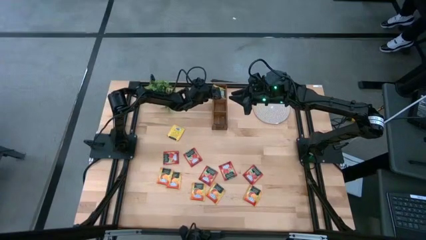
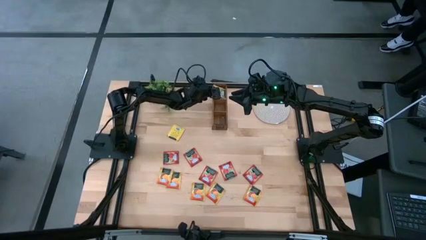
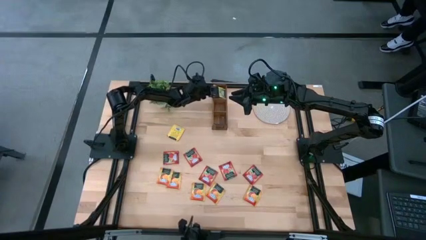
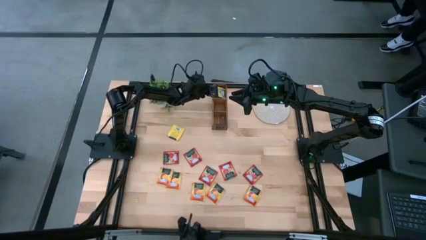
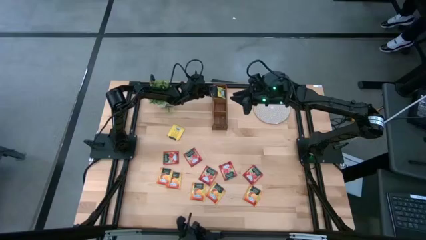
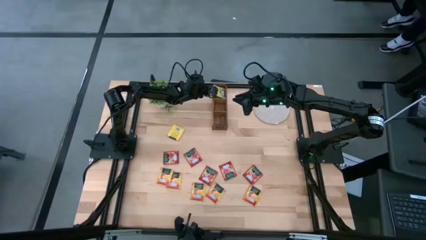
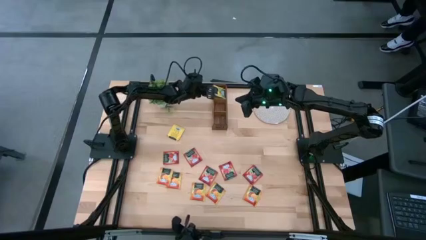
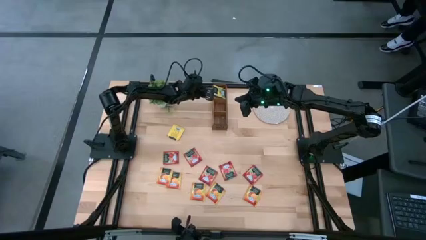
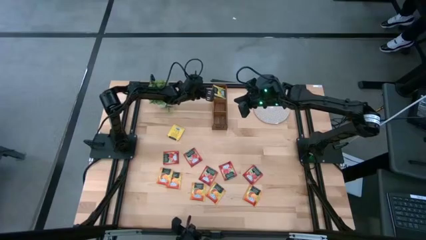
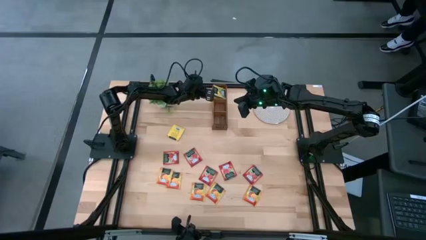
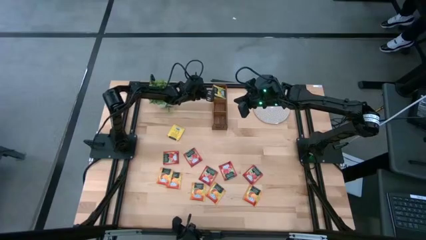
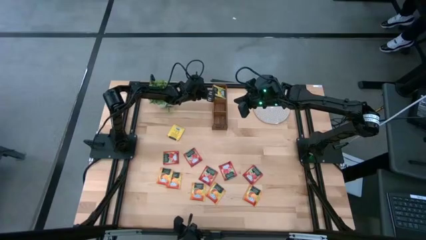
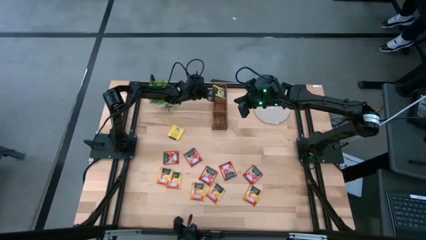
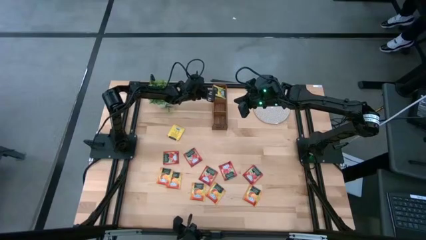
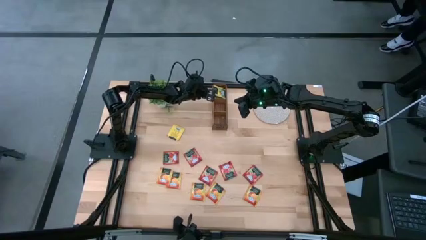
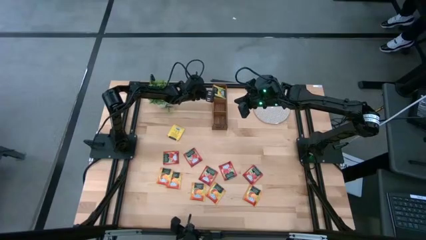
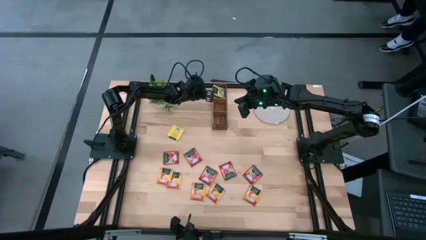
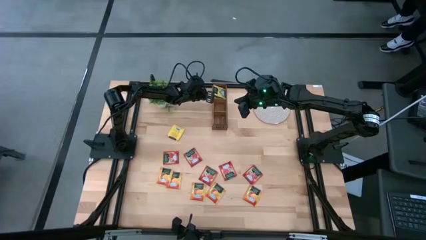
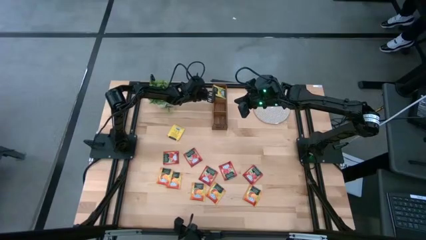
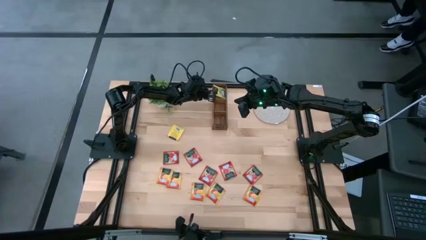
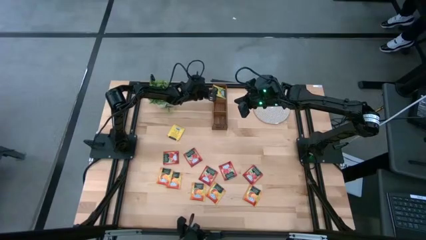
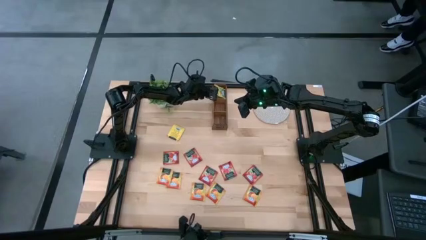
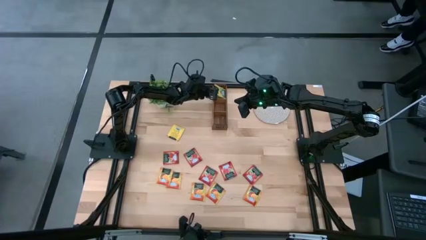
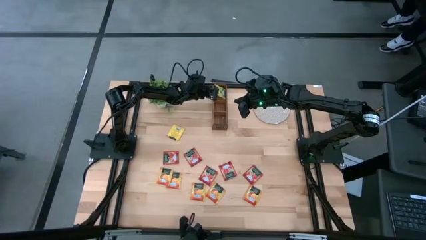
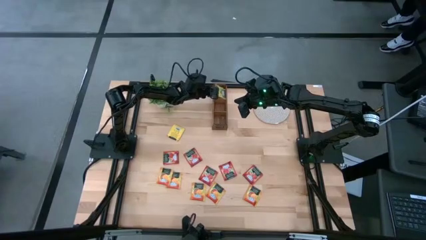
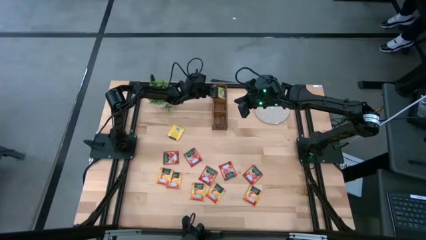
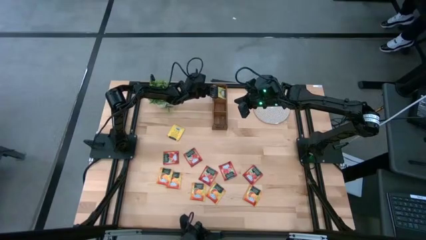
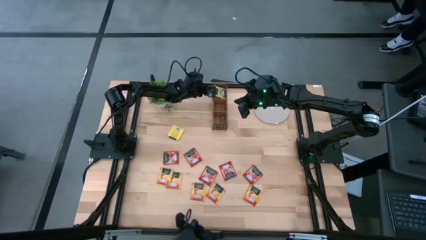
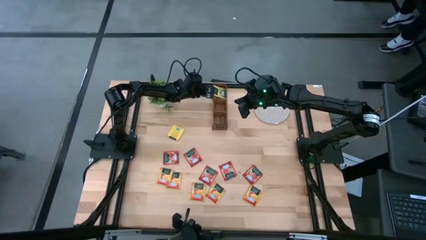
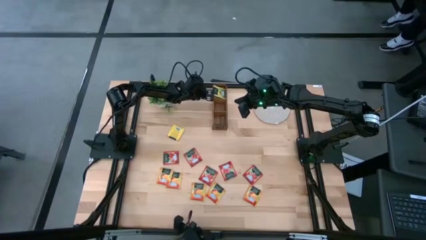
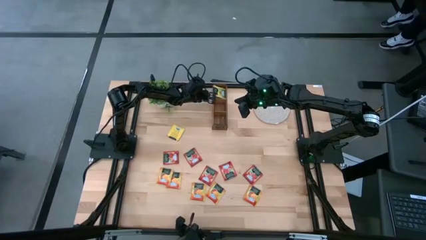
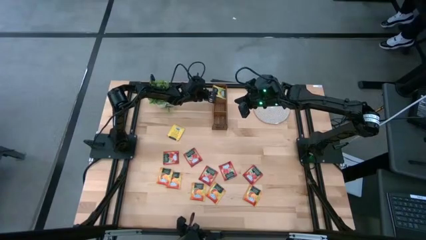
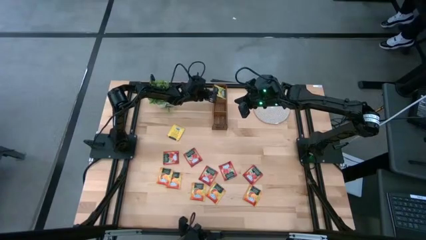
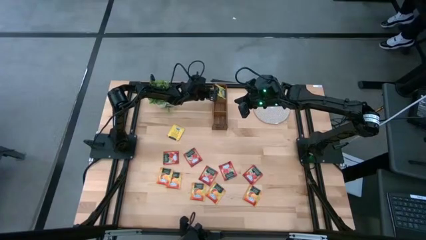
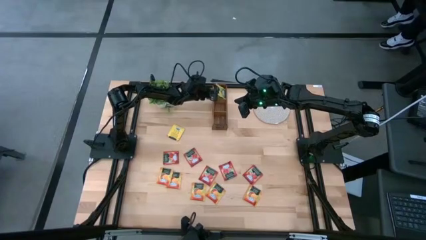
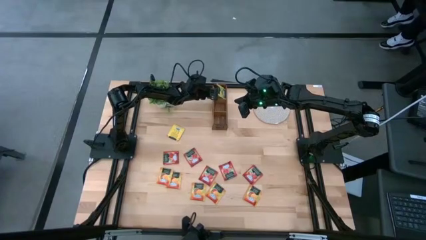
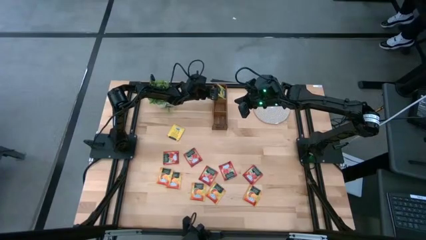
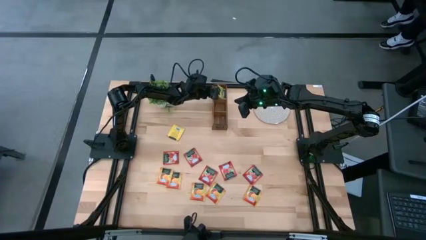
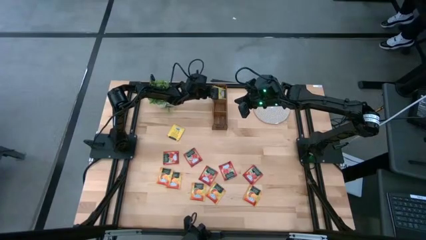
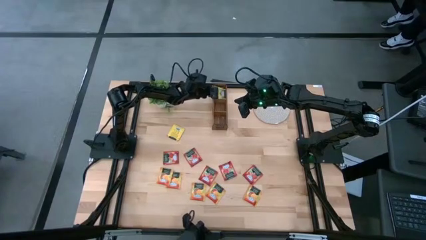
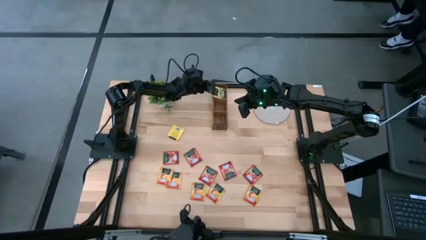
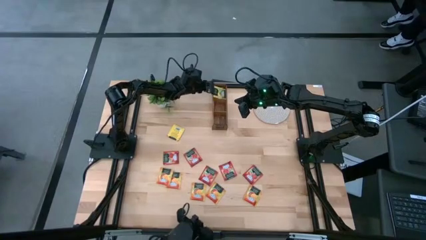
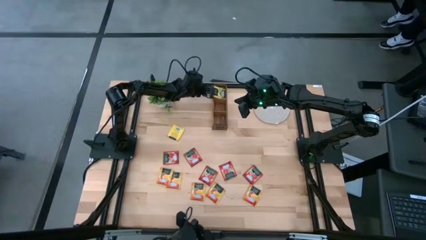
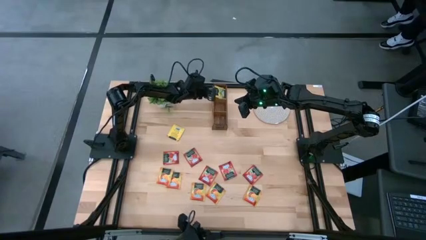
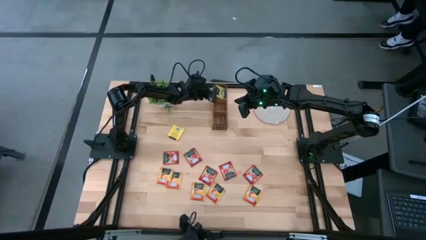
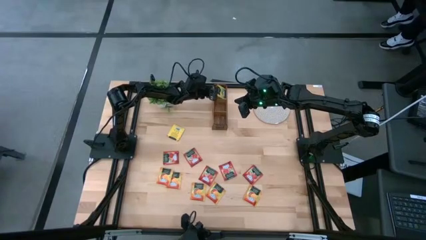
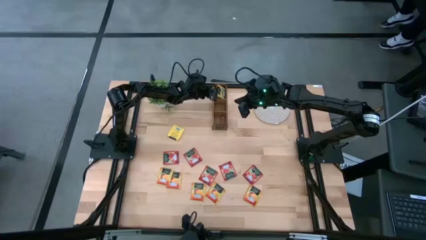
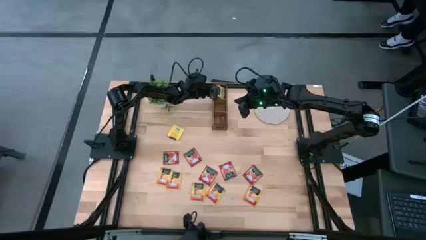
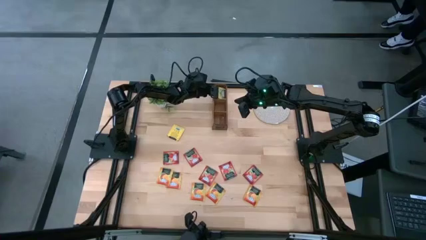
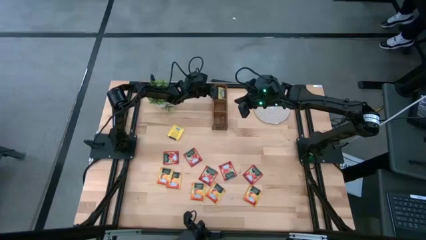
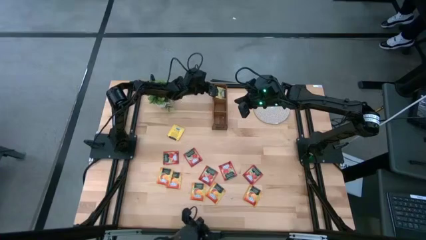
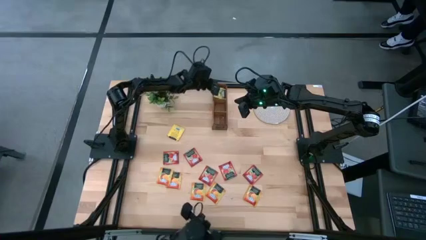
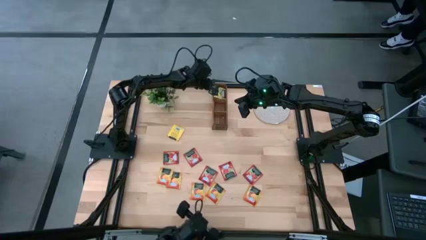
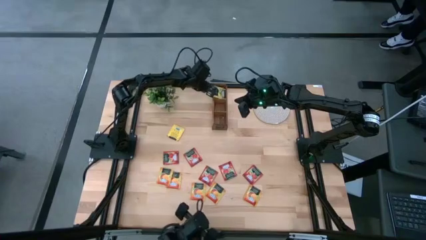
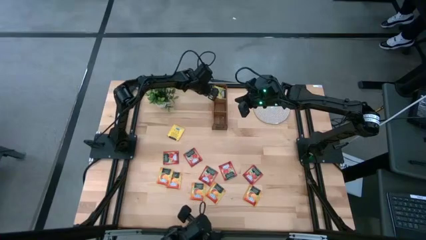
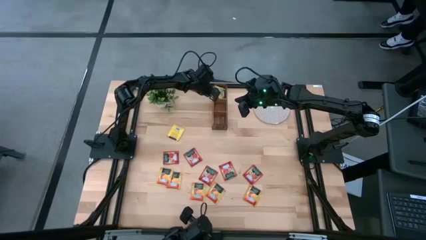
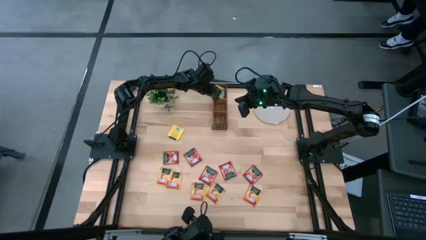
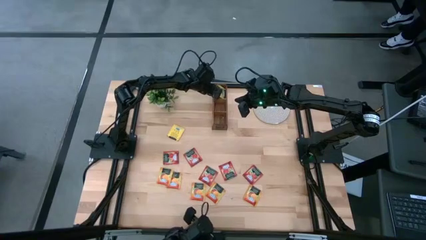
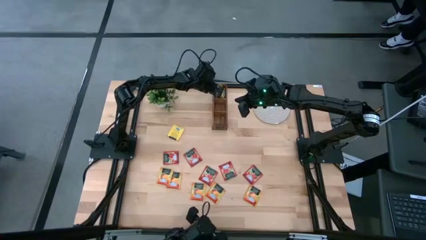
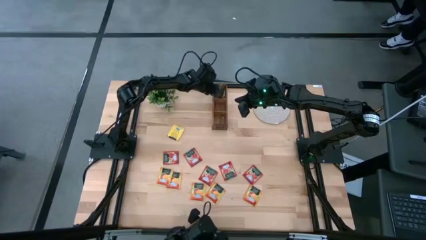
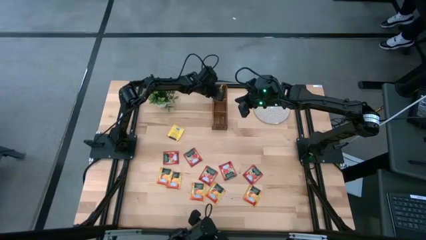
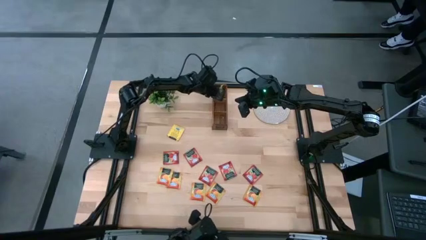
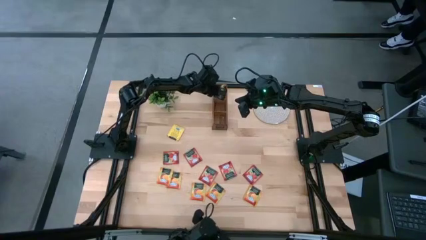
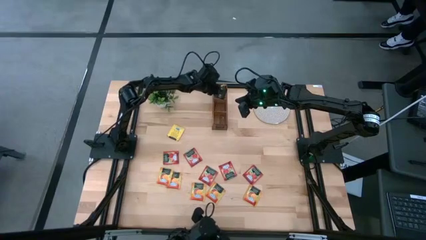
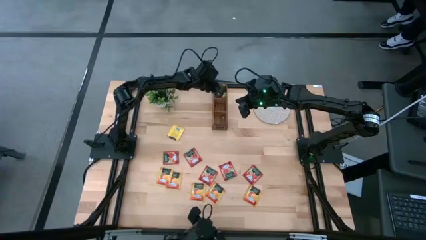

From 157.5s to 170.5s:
Task: Pick & Place Tea
Adjust the yellow tea bags in the wooden organizer

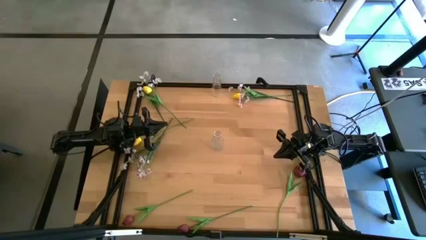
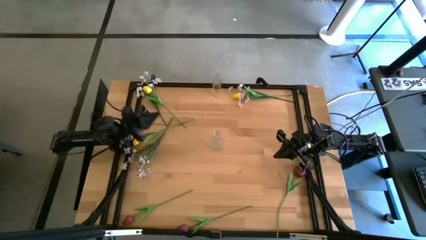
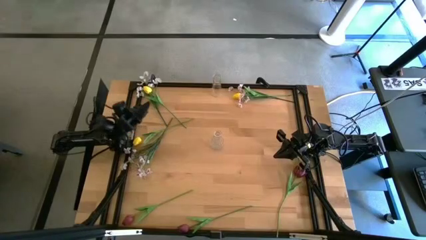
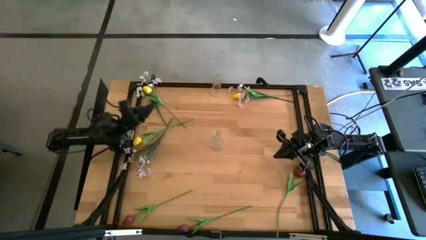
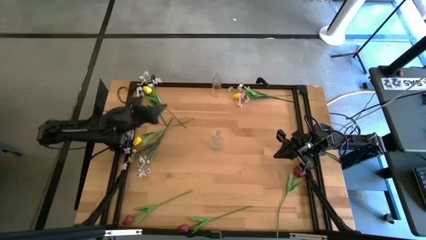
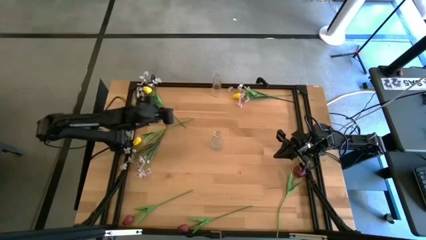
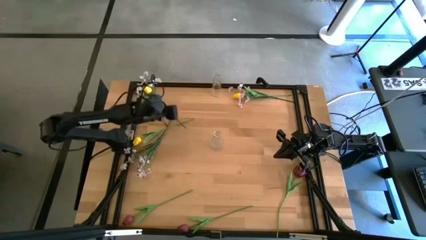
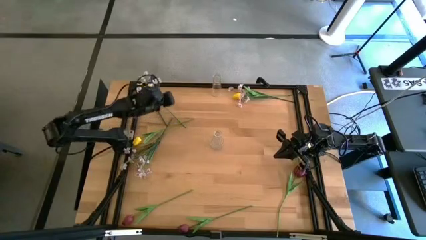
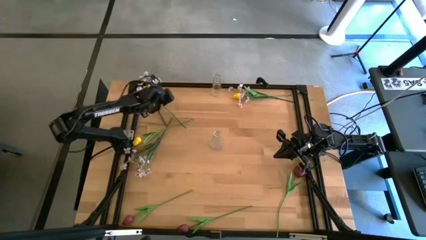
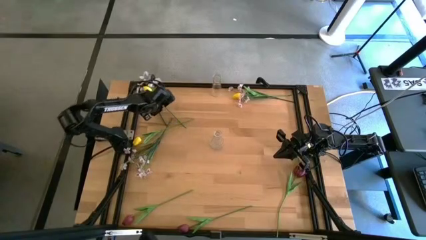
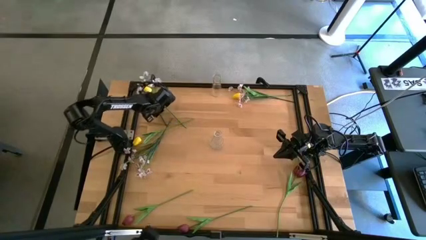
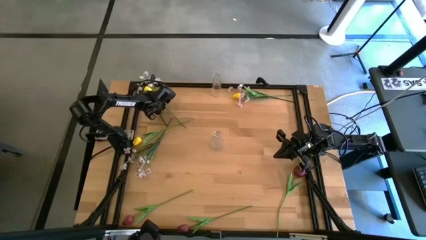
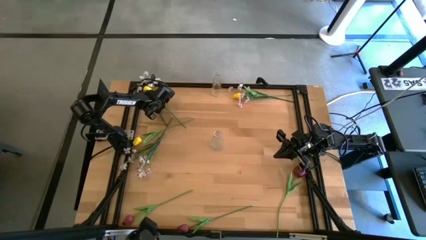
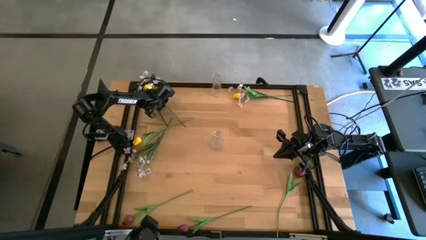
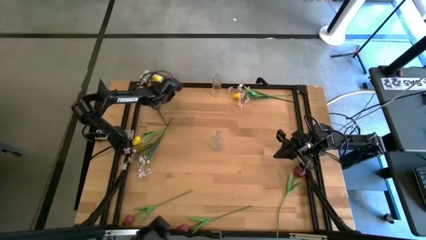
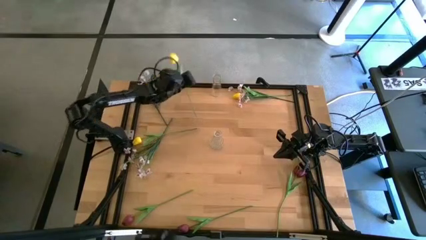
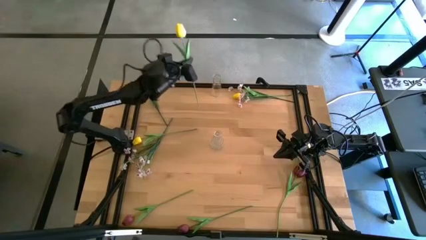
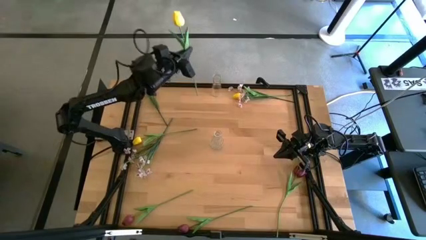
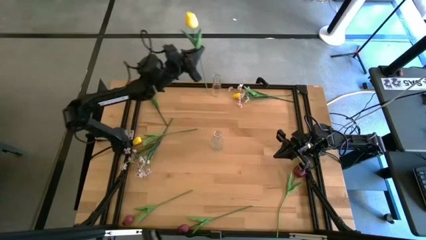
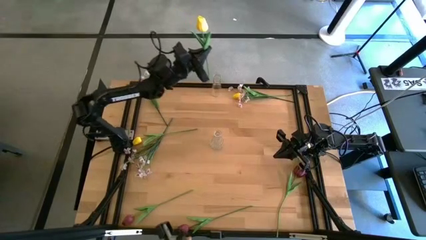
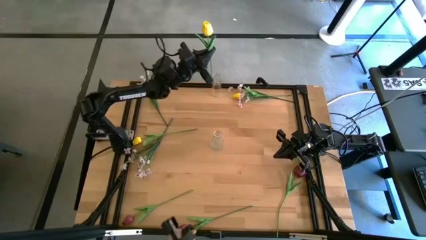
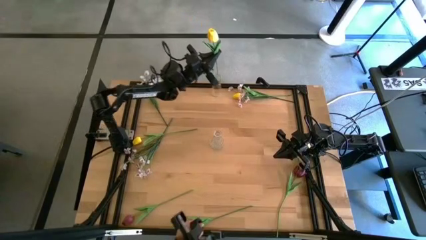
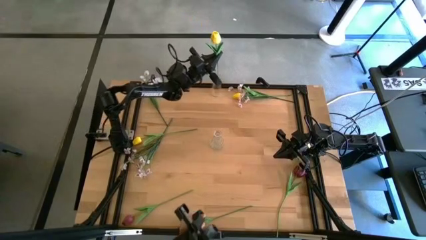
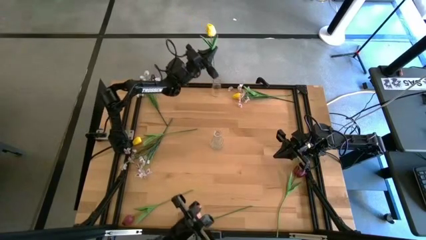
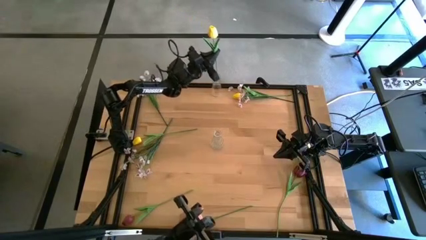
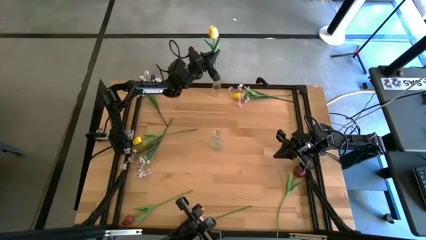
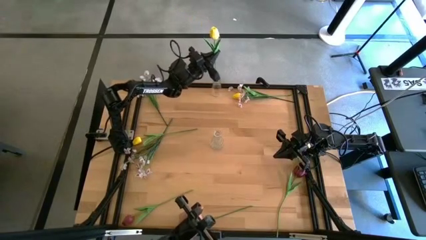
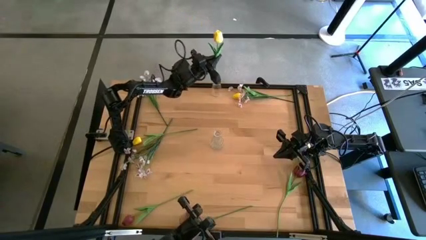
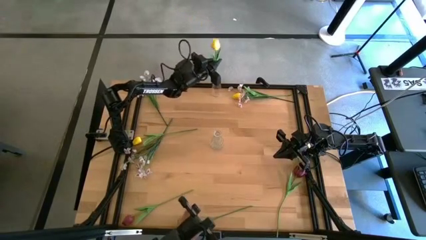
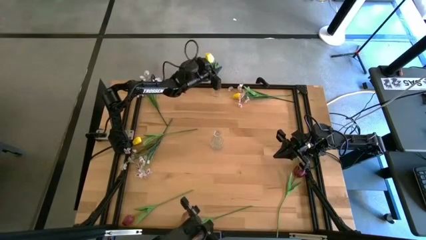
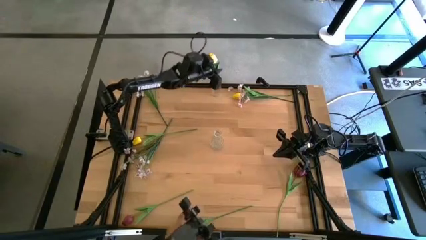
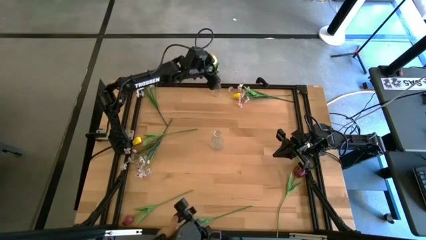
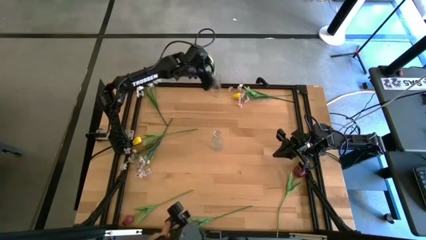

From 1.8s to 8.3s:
Task: Sort flowers into vase by color
Put the top left yellow flower into the top vase
